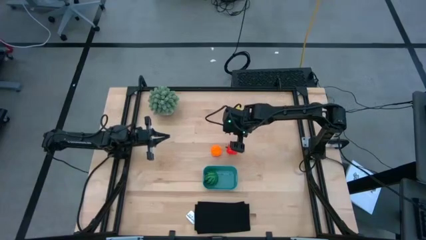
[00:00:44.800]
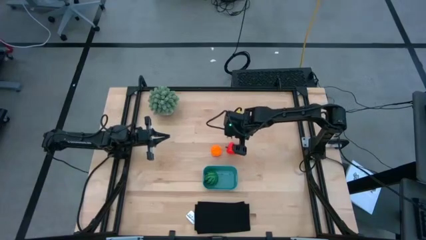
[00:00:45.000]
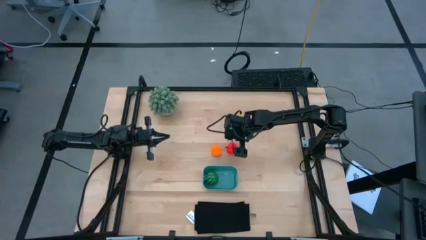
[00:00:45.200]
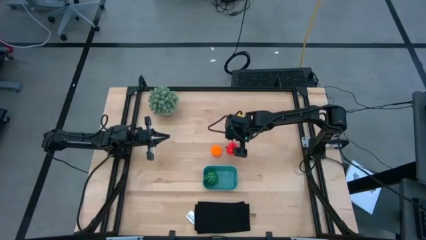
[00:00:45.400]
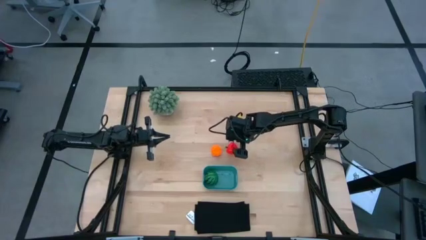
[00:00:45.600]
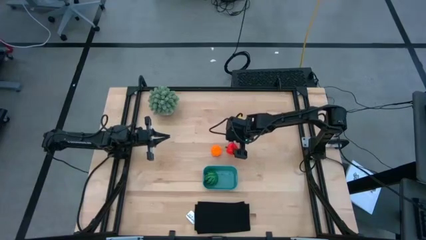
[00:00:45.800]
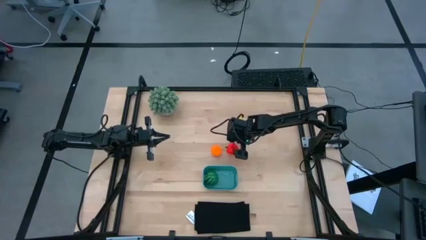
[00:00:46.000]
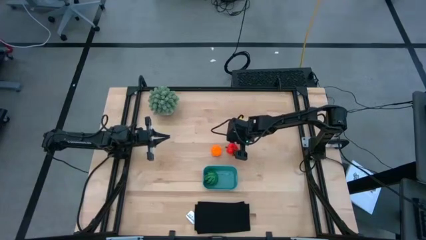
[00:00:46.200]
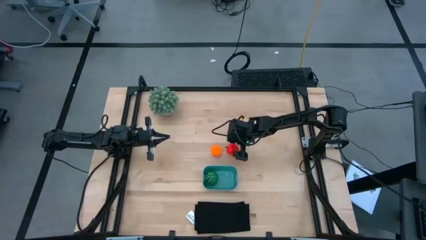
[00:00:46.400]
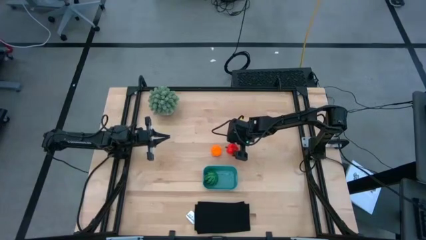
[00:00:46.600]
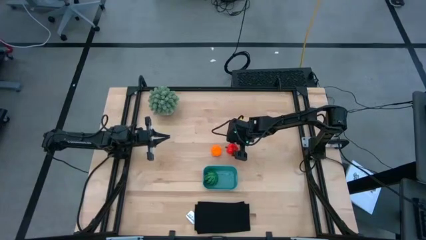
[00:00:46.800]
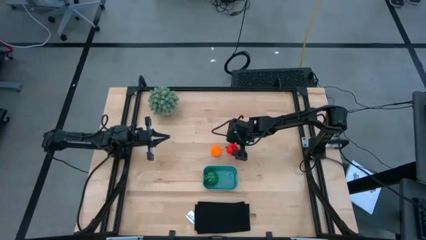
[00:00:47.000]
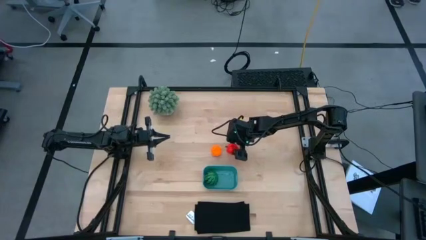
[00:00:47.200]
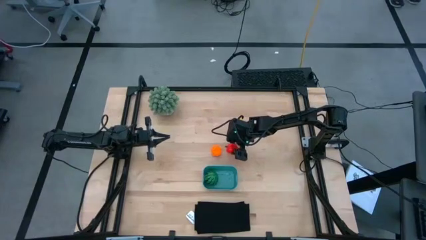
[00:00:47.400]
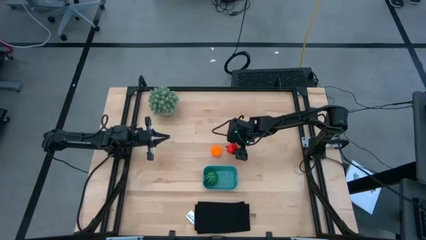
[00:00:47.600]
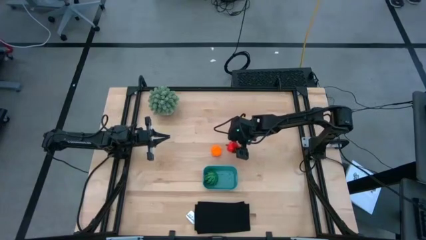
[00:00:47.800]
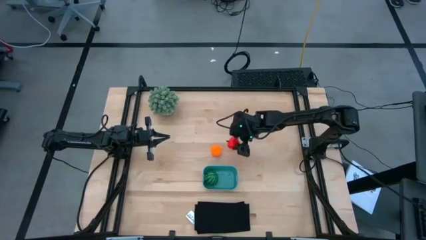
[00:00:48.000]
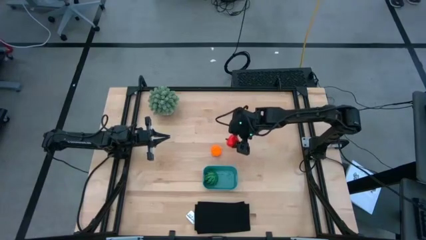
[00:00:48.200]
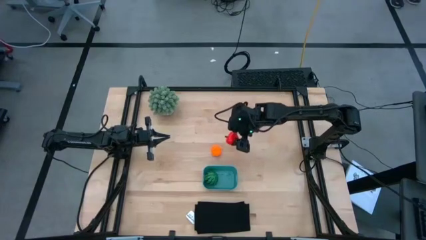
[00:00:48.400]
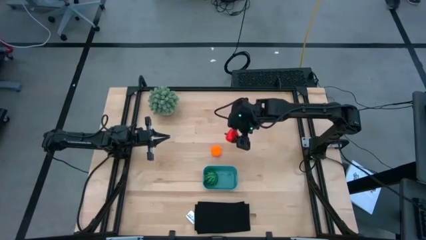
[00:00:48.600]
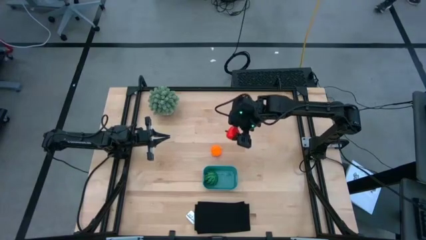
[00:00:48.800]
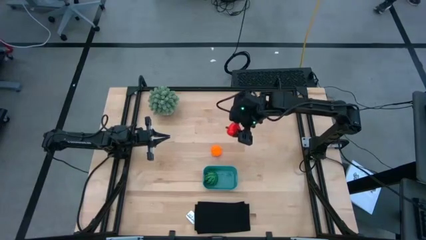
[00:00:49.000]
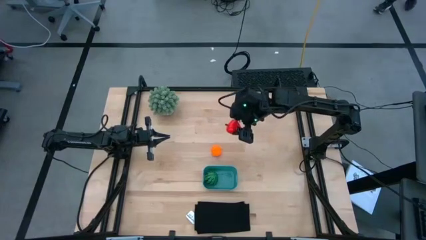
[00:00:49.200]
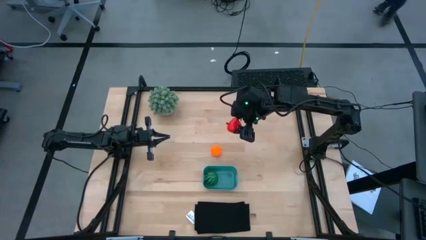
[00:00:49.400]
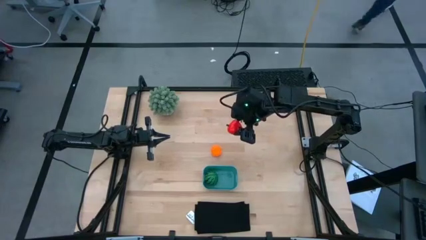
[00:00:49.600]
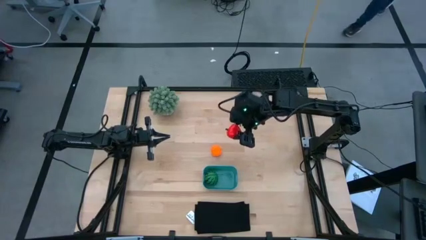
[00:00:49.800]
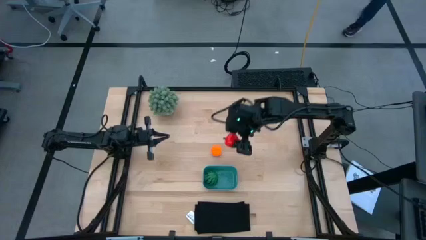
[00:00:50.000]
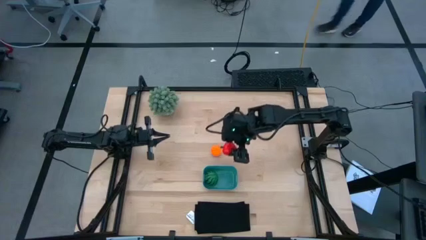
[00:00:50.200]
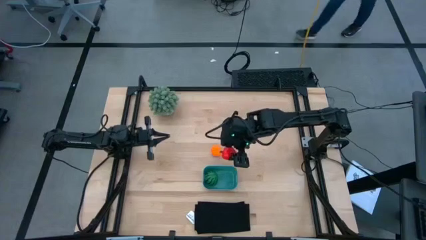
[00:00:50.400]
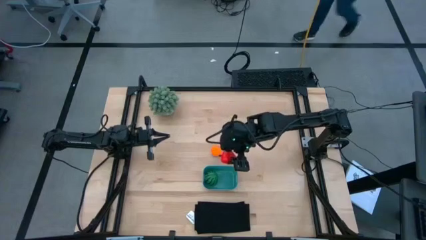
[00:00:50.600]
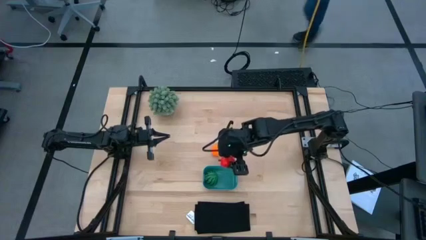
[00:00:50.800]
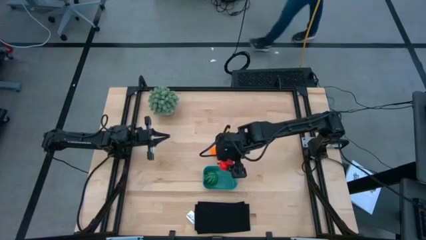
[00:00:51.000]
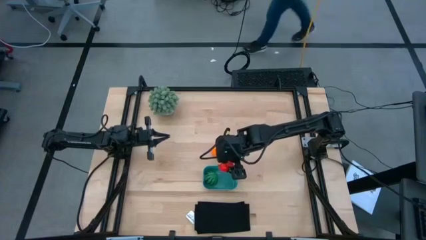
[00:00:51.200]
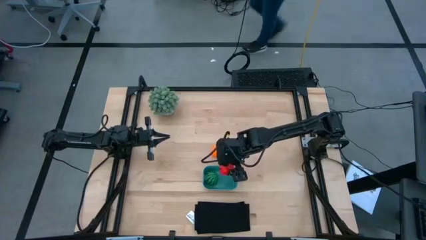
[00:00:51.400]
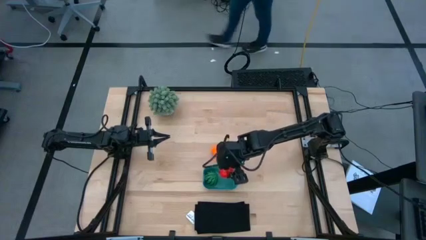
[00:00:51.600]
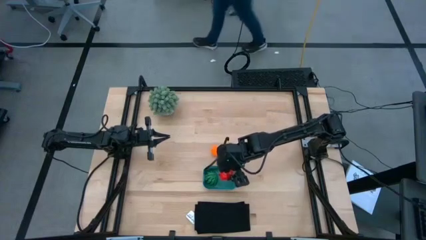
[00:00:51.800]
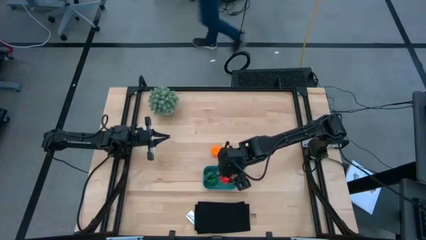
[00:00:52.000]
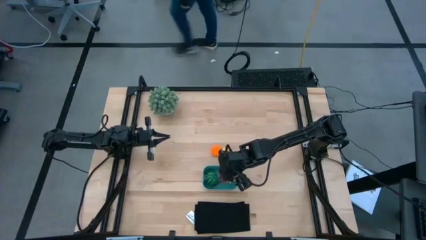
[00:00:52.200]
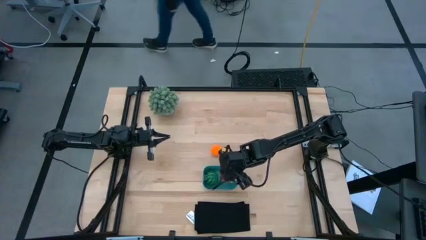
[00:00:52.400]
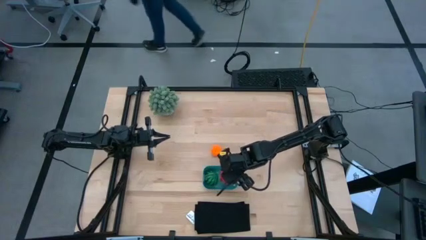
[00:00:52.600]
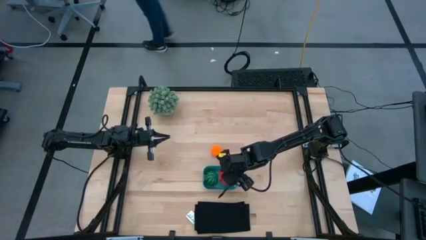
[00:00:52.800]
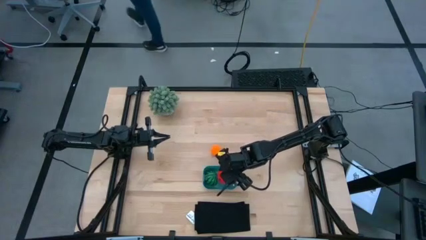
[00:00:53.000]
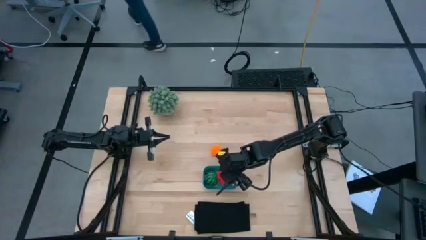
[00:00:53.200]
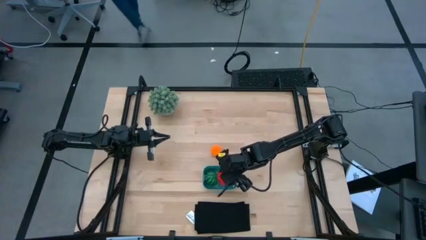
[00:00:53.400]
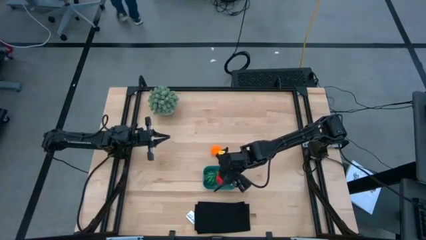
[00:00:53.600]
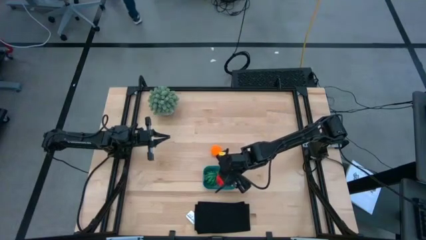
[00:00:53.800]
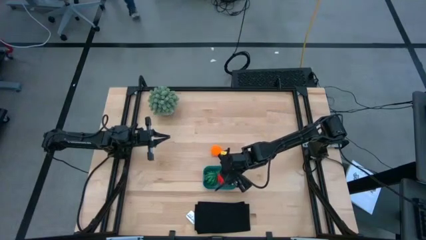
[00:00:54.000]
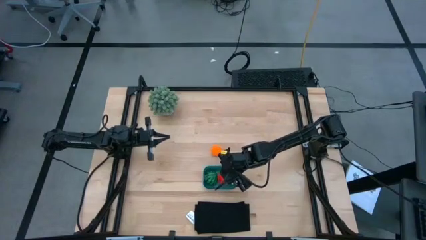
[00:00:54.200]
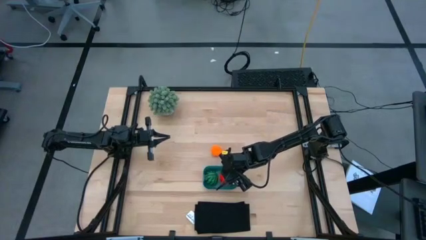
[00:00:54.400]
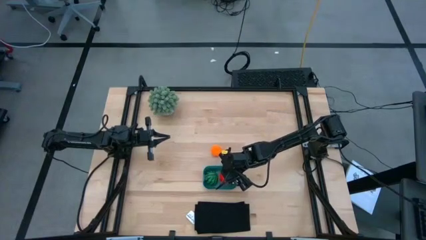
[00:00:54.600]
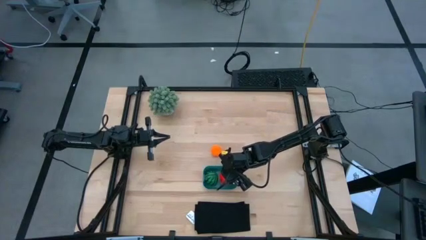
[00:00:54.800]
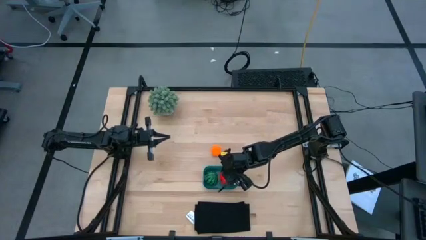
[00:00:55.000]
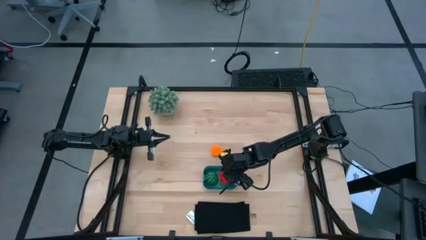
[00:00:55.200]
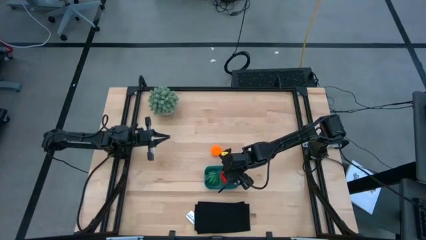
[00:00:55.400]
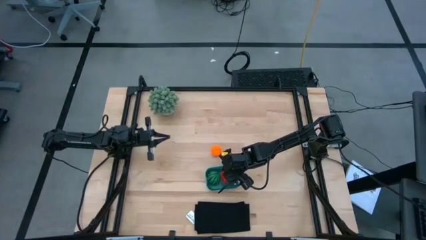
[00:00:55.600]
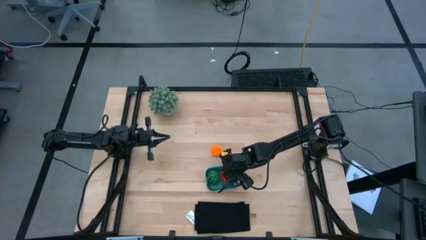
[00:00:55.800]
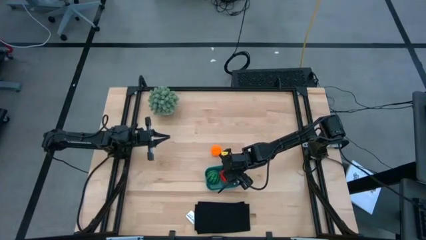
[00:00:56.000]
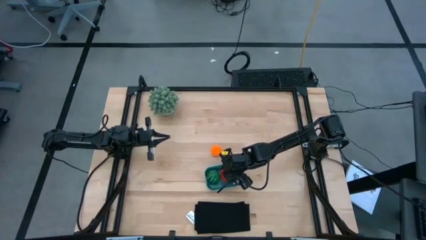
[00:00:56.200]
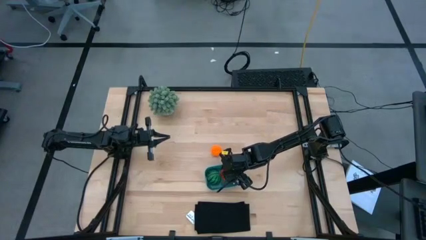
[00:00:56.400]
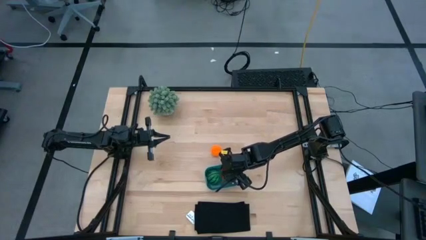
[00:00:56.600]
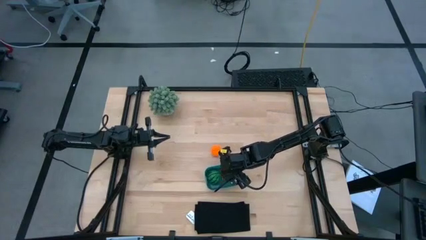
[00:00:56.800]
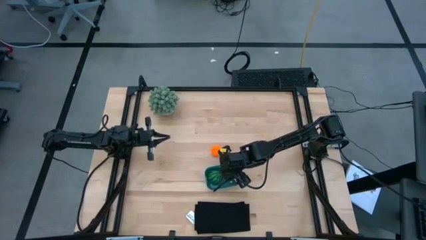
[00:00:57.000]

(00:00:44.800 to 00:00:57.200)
Task: Pick and placing Produce into tupperware
Put the apple into the blue bin

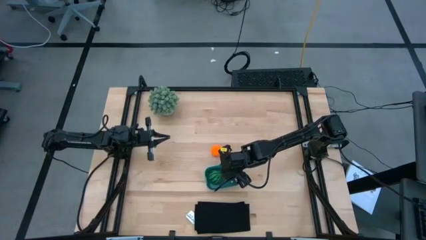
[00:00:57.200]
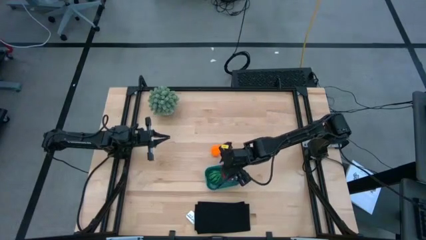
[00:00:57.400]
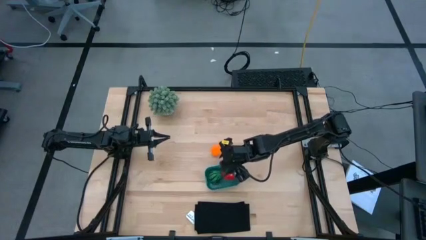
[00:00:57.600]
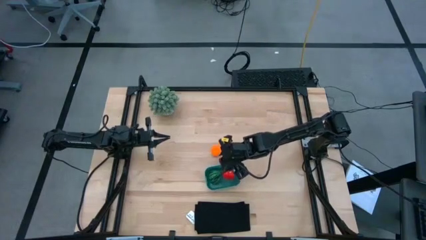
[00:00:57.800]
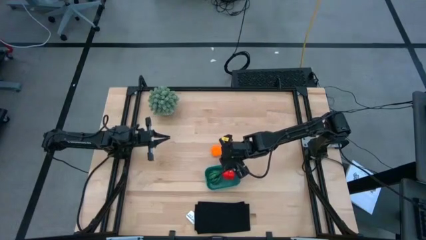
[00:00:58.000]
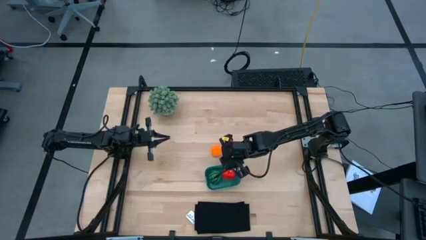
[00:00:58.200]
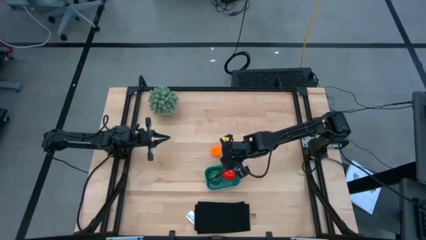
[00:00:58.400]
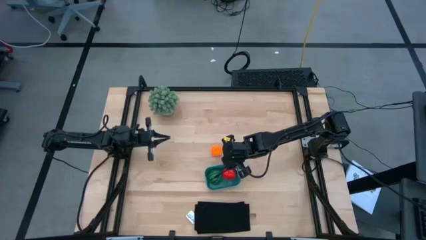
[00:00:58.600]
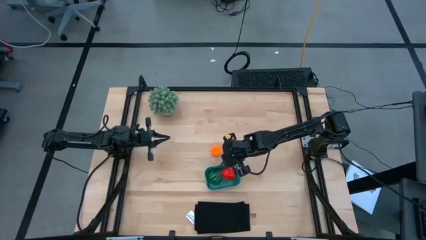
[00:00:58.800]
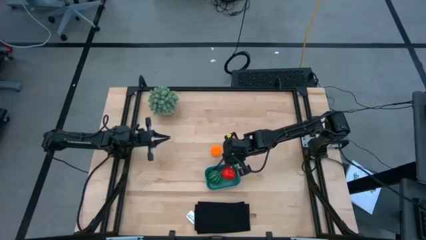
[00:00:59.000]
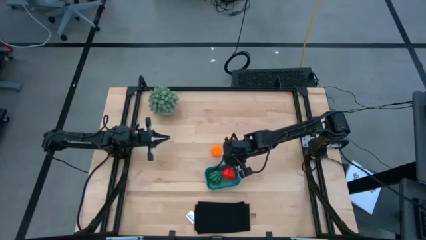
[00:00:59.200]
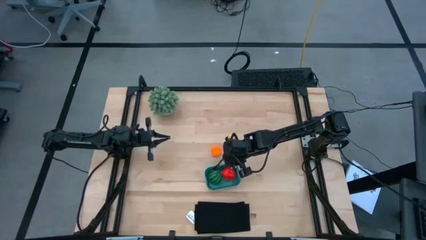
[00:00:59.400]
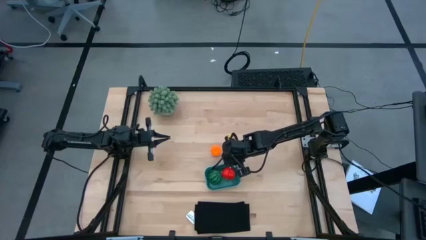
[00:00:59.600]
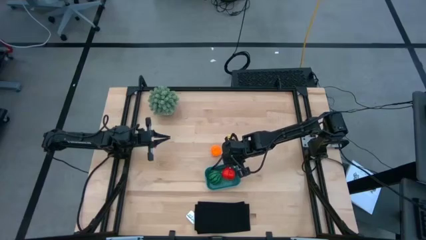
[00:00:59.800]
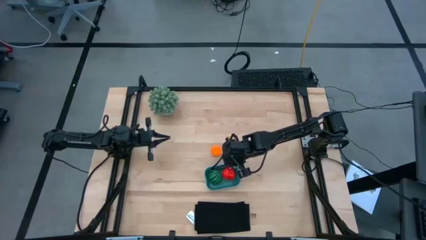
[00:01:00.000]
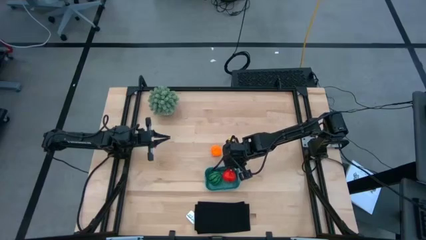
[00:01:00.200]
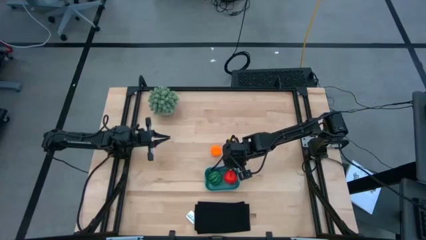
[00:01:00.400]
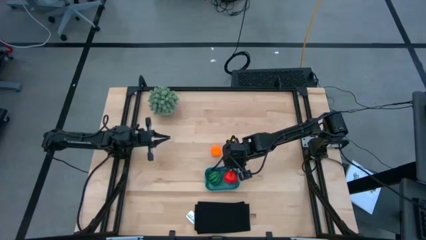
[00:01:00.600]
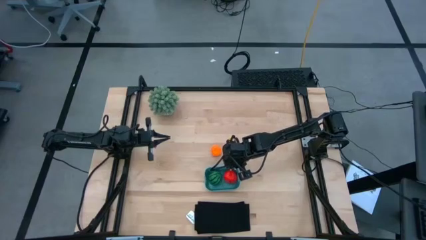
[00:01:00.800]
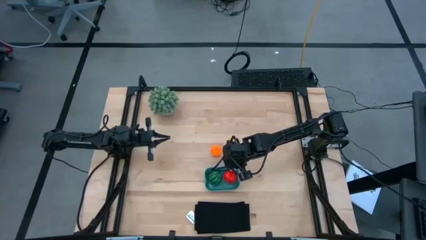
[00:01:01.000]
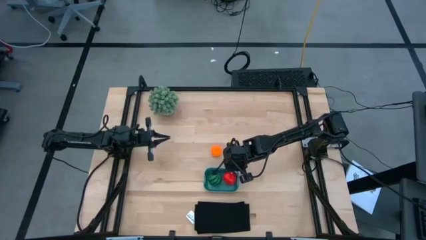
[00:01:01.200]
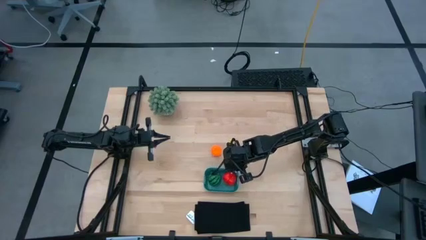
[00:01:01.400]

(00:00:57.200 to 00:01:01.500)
Adjust the blue bin
